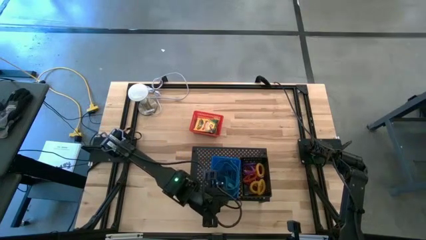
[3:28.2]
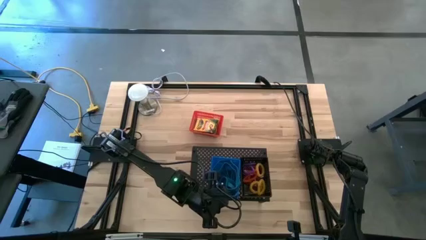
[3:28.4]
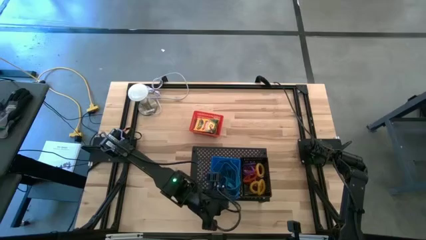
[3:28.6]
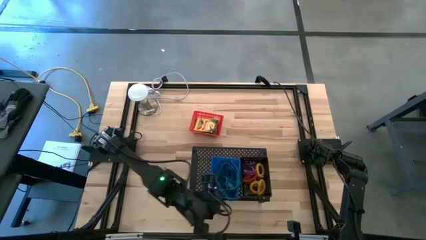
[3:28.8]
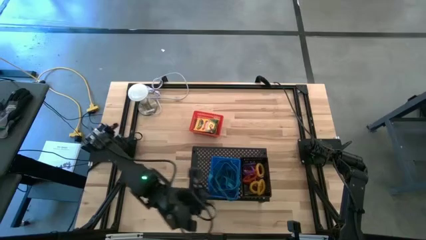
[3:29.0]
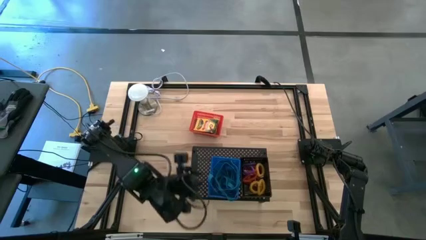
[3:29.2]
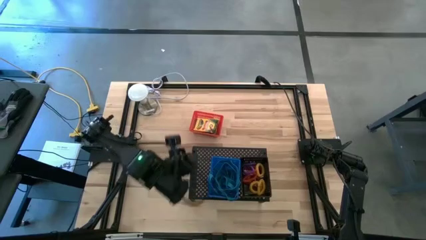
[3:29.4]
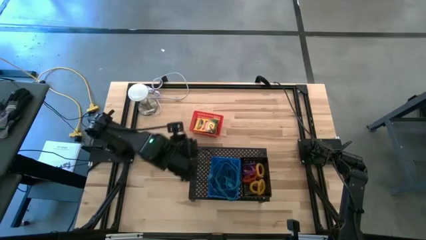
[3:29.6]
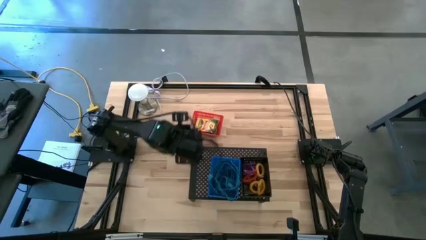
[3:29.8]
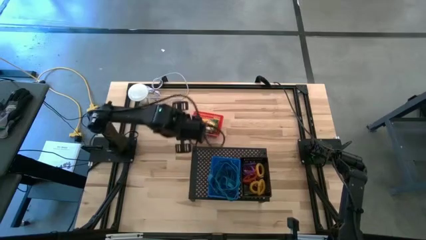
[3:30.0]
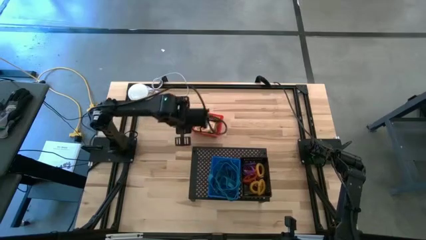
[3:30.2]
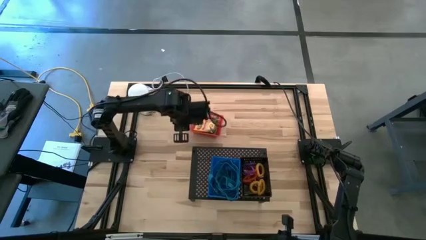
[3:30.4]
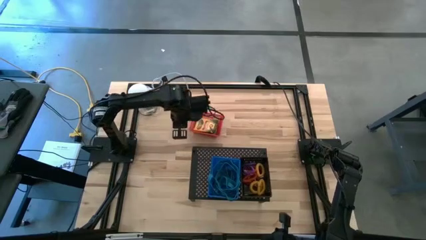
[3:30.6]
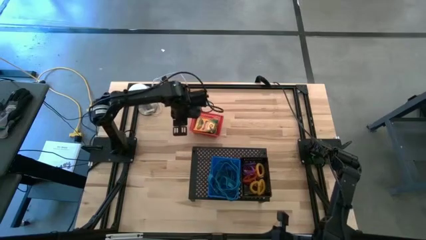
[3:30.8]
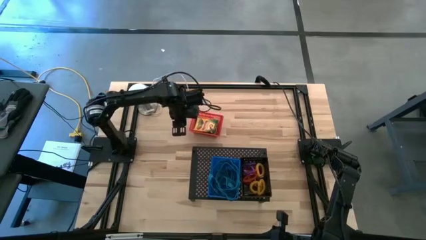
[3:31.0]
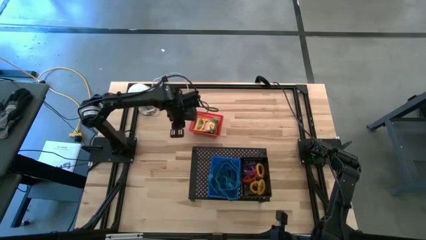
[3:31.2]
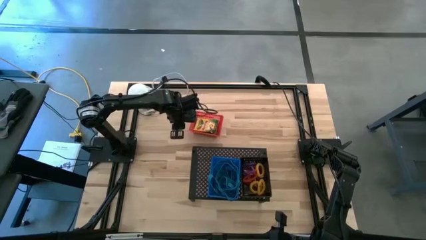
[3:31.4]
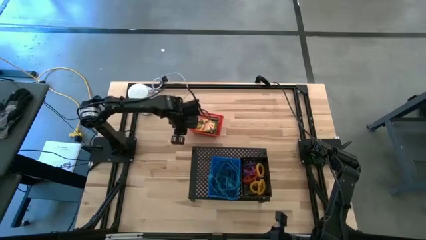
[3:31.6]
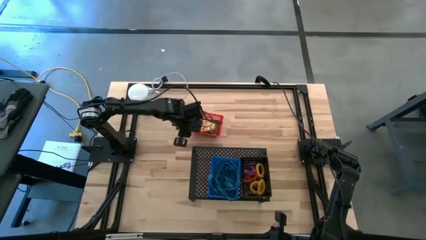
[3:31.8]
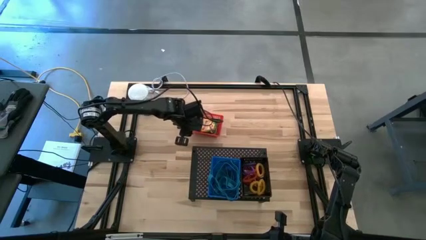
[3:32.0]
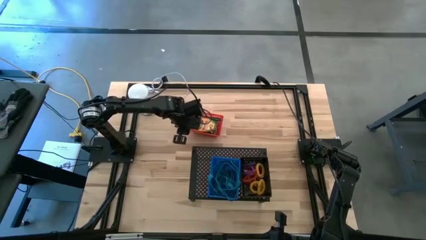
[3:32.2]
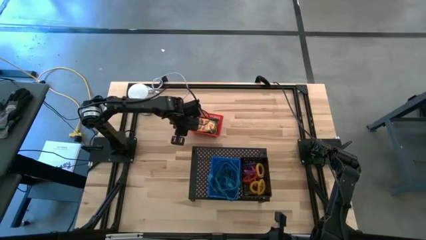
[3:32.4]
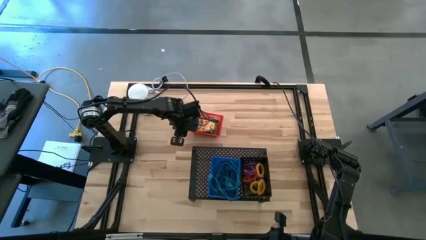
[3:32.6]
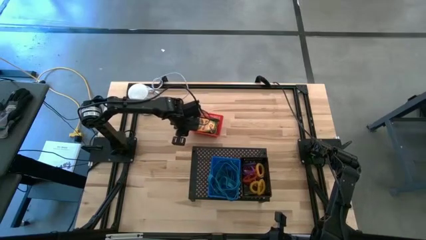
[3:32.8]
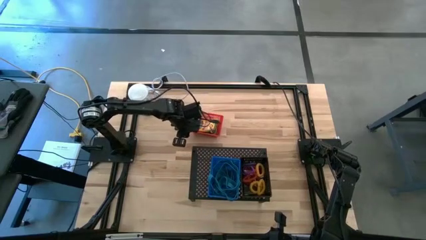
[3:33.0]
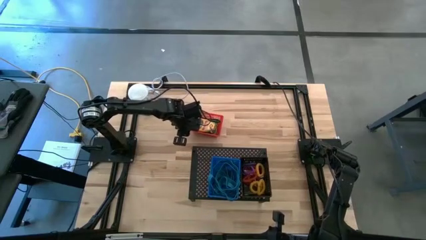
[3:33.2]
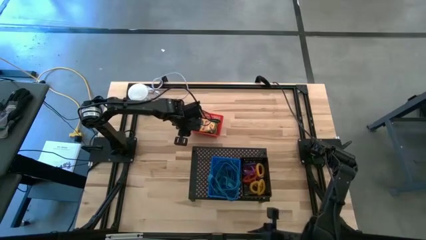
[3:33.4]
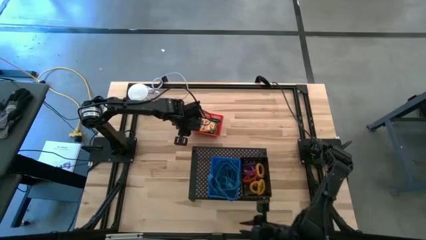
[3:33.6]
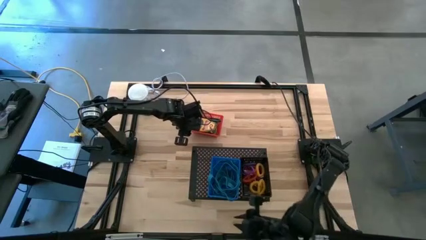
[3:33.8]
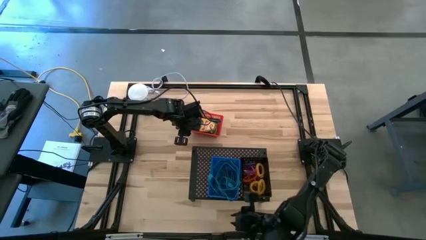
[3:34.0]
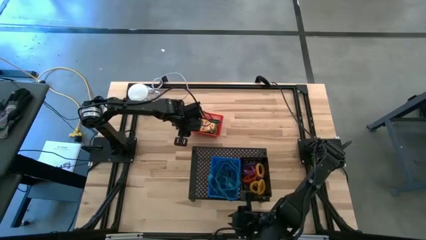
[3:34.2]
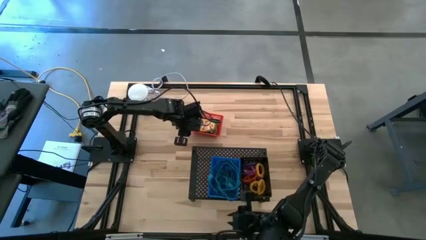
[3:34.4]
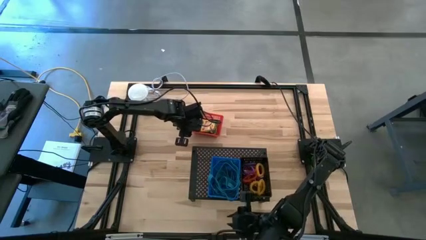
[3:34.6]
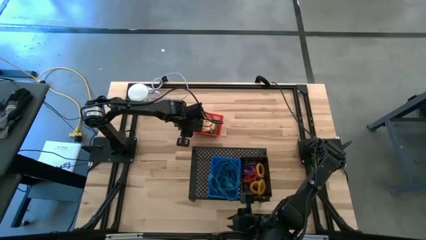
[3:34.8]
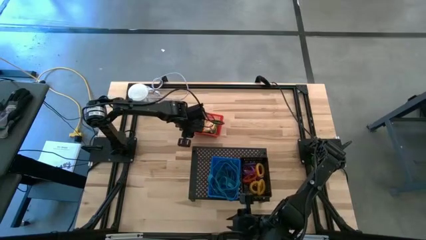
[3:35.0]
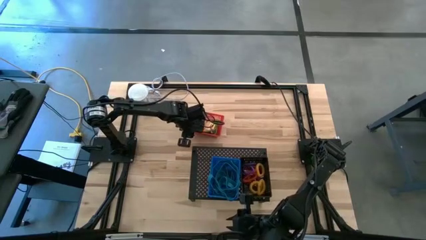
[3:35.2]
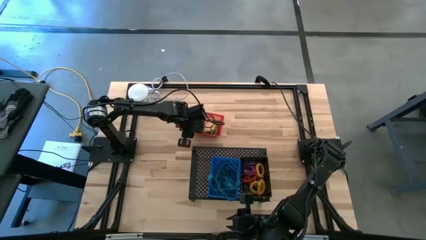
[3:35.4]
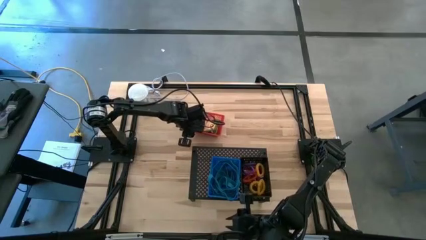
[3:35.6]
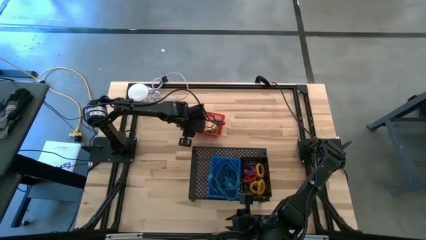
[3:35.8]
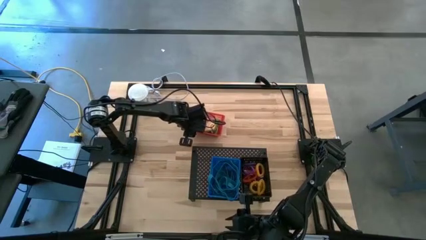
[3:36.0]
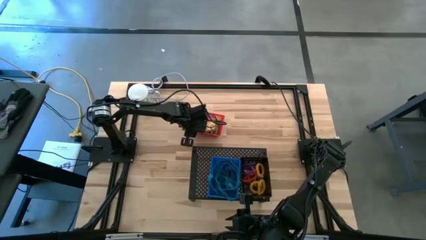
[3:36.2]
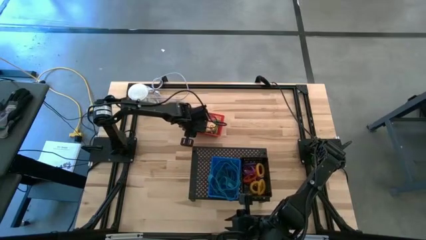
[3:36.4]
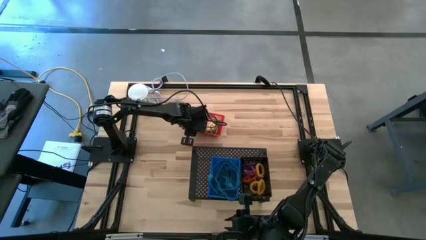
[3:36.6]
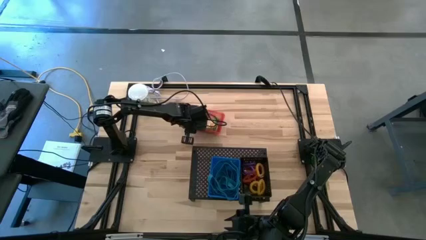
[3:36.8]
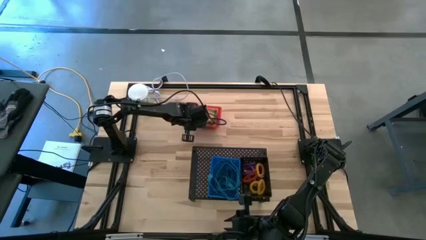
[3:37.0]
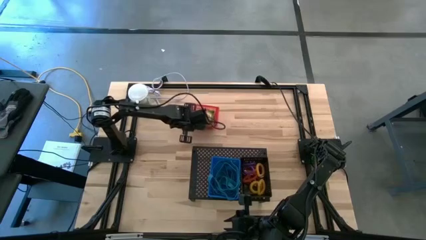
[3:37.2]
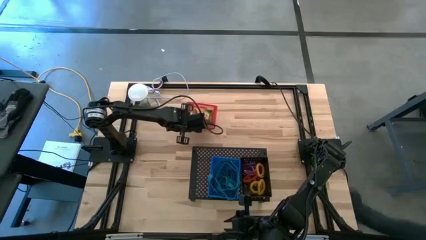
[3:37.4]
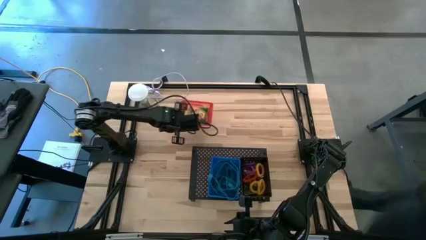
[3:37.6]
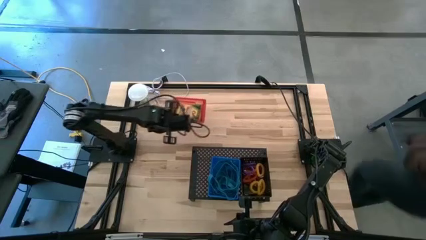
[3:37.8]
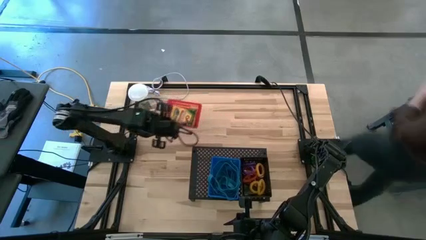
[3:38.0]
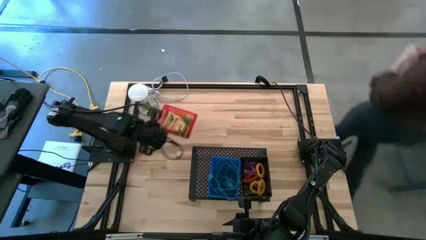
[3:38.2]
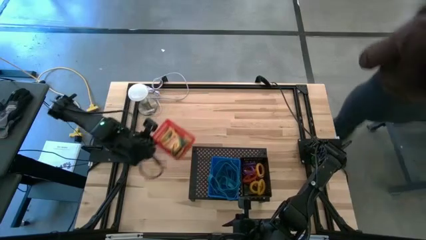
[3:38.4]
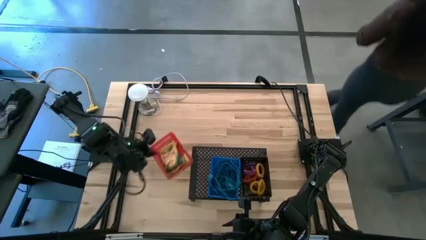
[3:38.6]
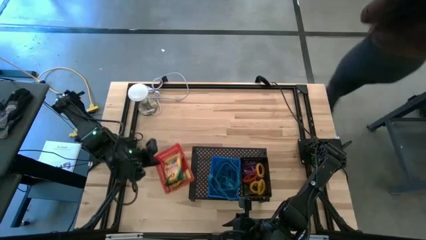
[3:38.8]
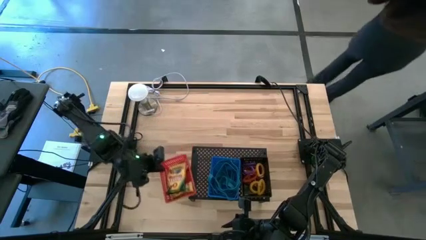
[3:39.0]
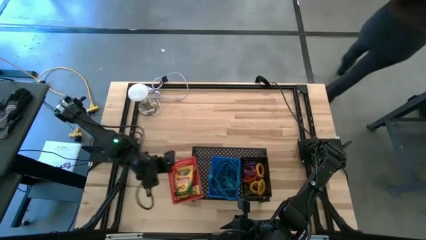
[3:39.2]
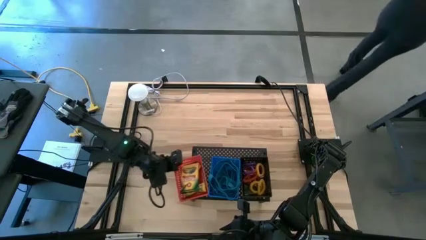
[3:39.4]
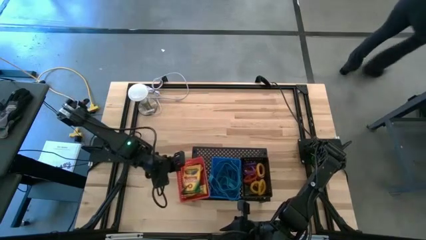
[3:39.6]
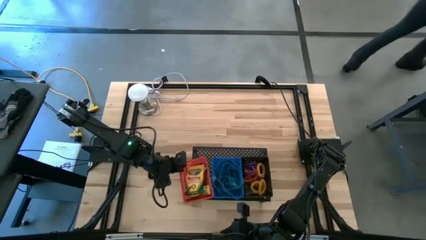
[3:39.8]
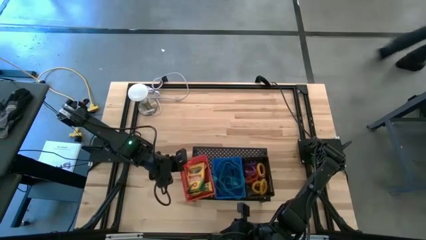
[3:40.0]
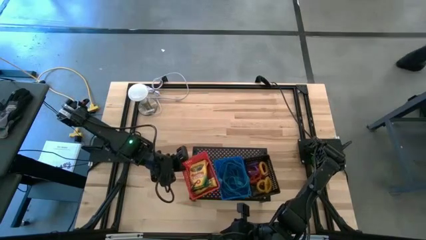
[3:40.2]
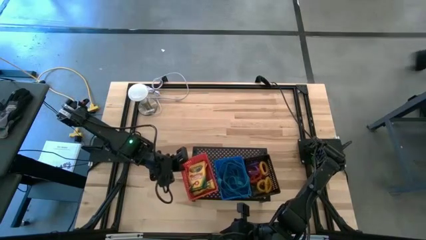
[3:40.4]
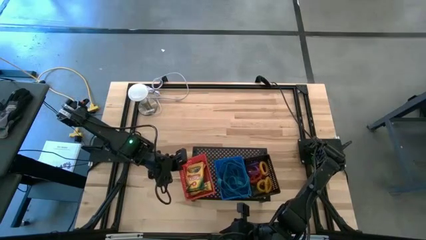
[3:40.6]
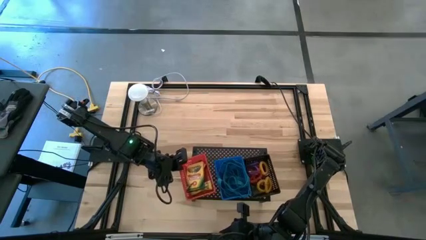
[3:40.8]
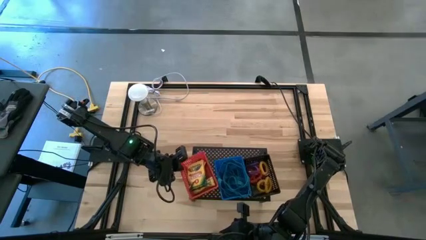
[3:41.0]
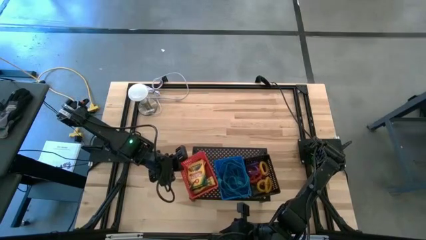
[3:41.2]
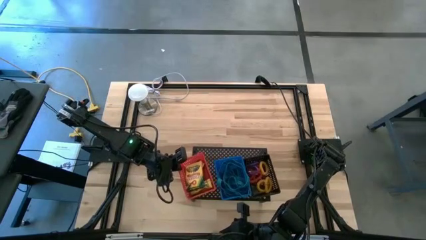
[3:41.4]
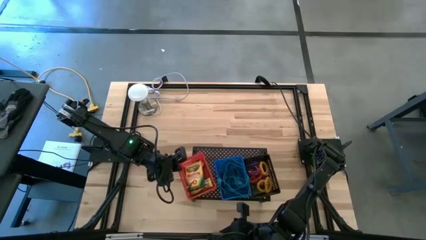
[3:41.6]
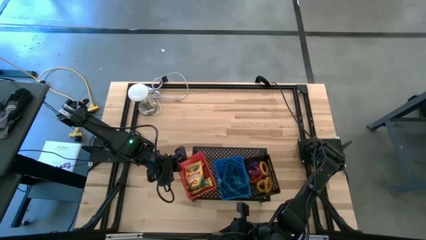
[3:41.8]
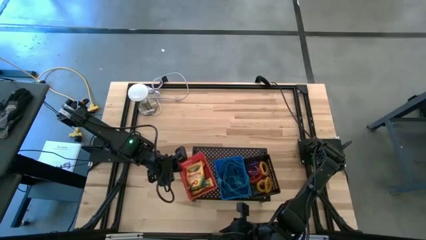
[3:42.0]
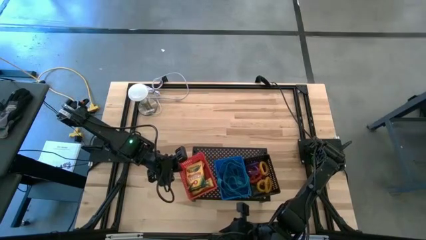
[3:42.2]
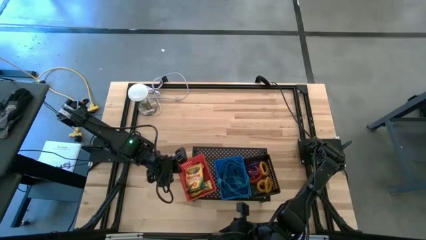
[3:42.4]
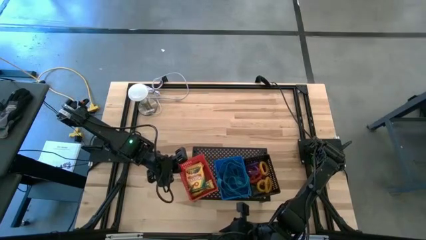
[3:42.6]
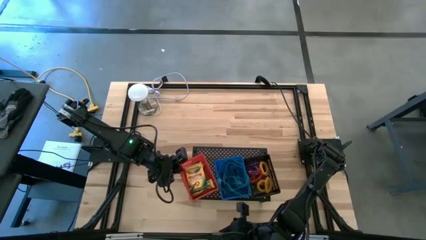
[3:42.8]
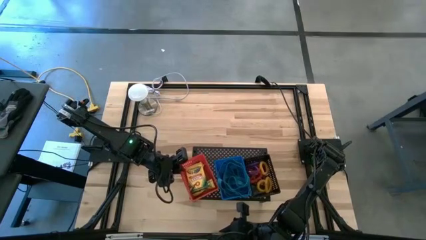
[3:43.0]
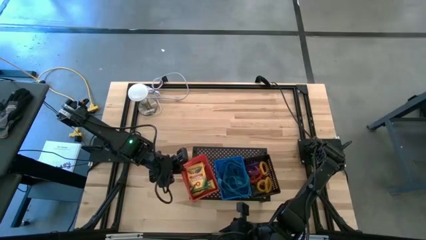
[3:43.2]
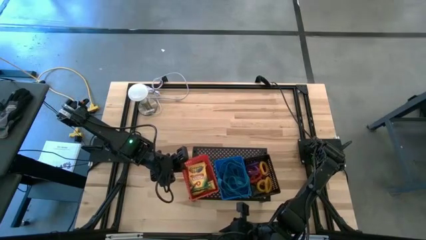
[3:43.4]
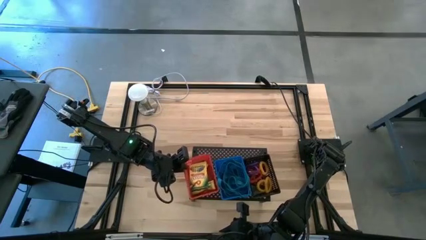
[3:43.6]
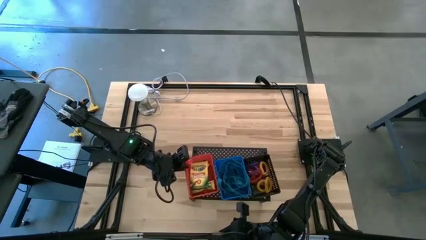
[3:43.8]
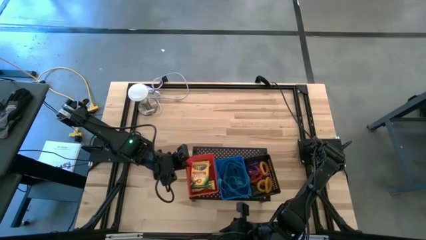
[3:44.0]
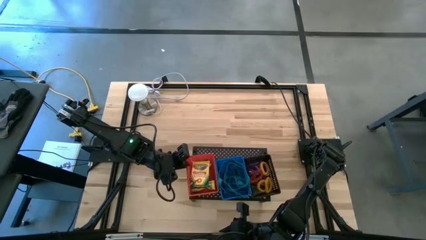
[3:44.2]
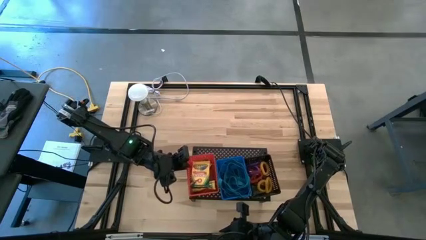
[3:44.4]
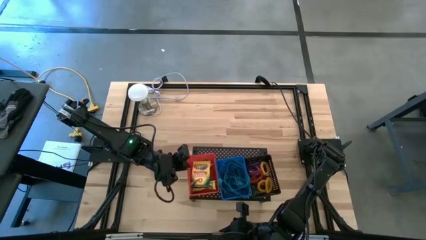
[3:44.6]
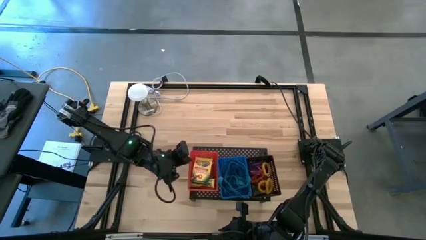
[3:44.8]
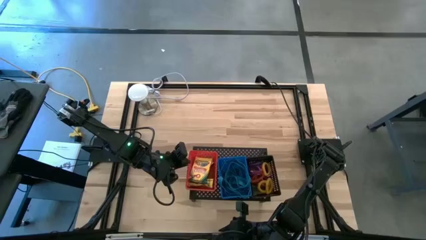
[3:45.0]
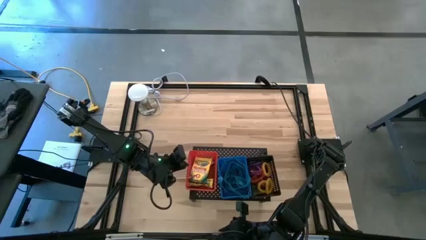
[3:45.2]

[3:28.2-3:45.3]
Task: Pick & Place Office Desk Supplies
Put the red bin with crayon boxes on the shelf
